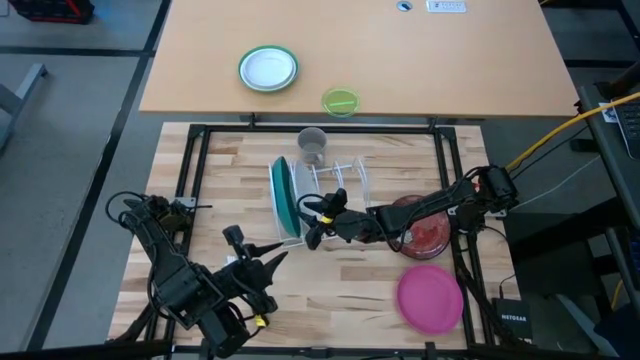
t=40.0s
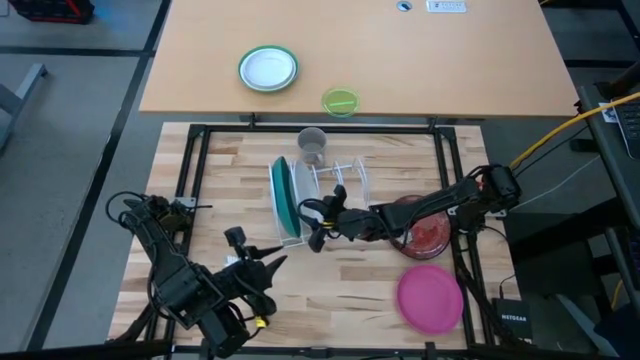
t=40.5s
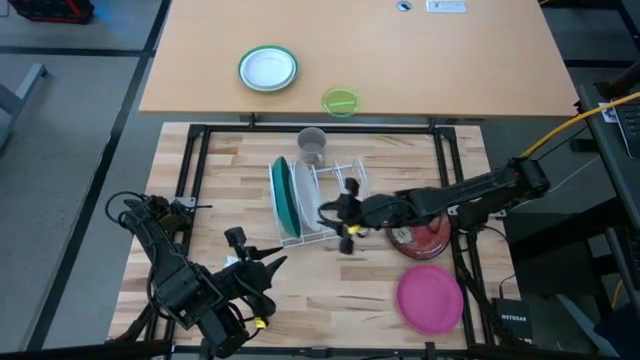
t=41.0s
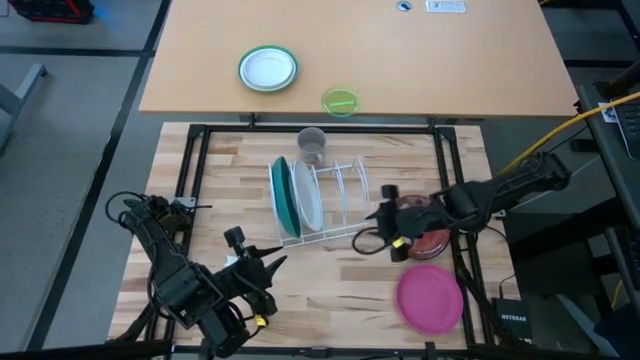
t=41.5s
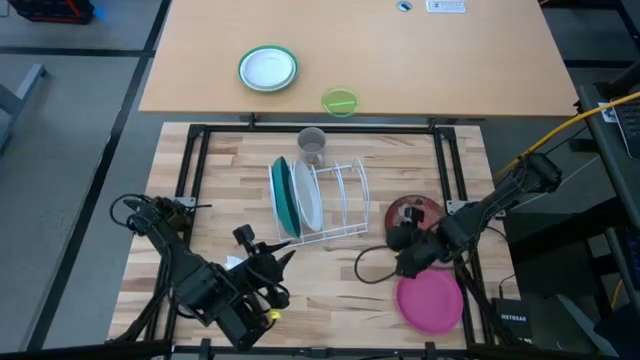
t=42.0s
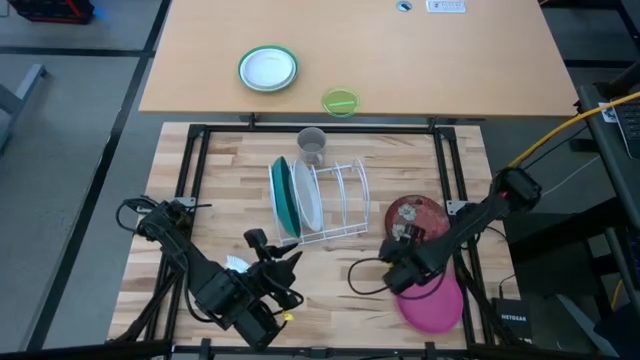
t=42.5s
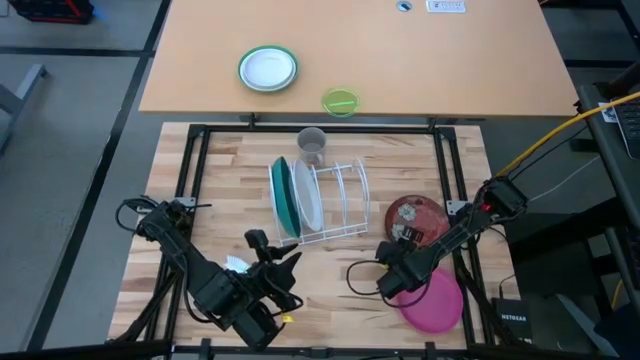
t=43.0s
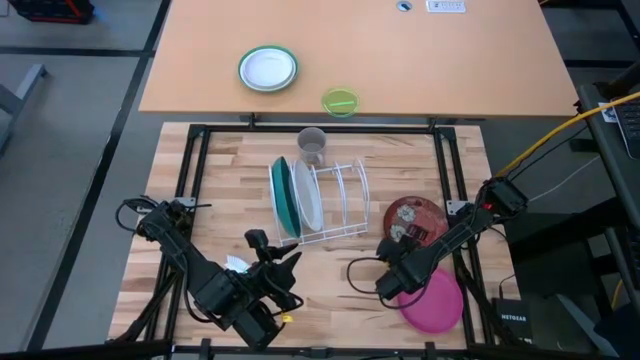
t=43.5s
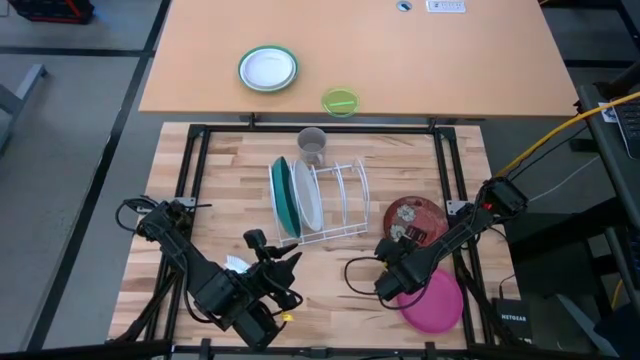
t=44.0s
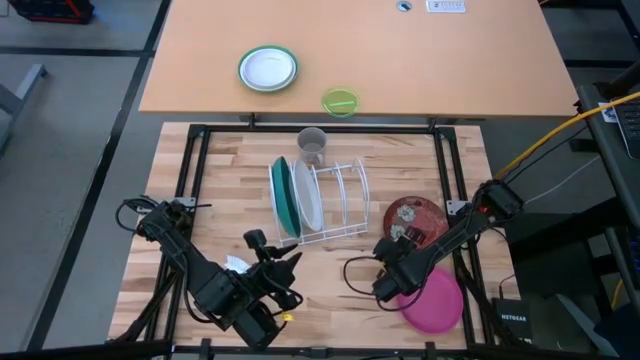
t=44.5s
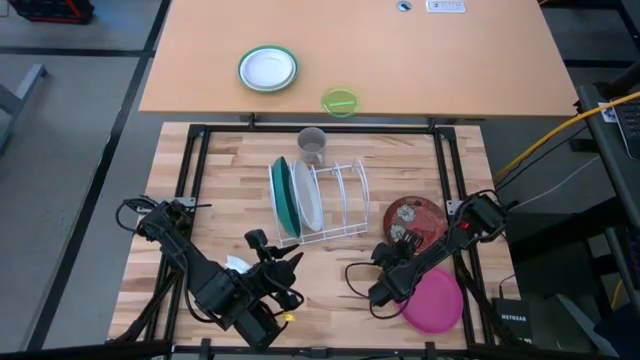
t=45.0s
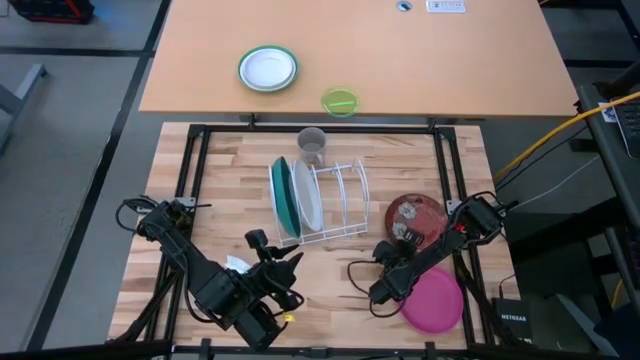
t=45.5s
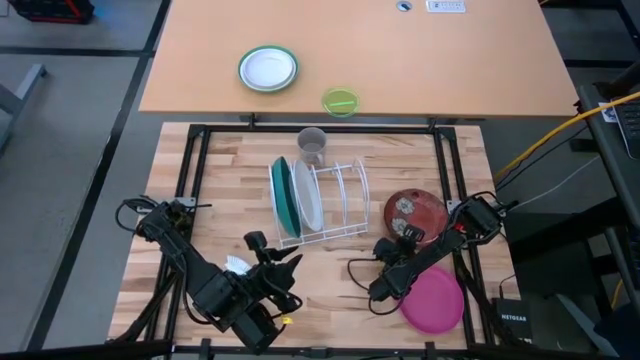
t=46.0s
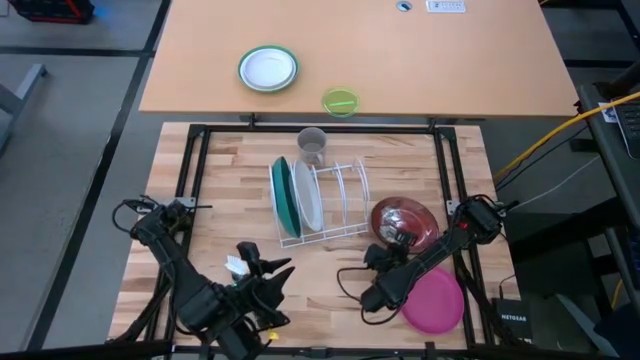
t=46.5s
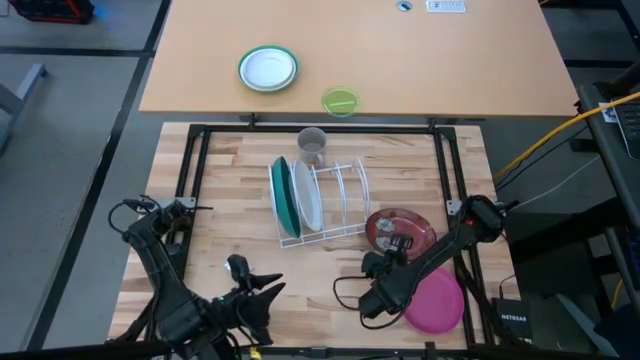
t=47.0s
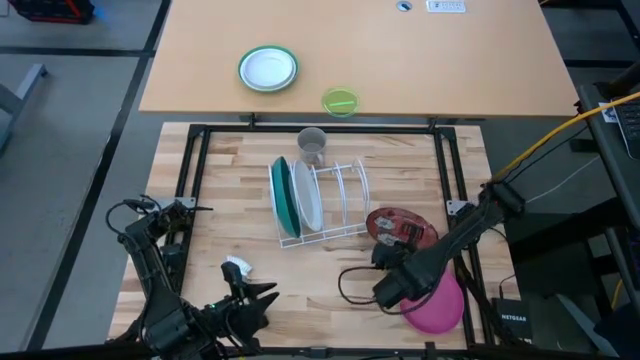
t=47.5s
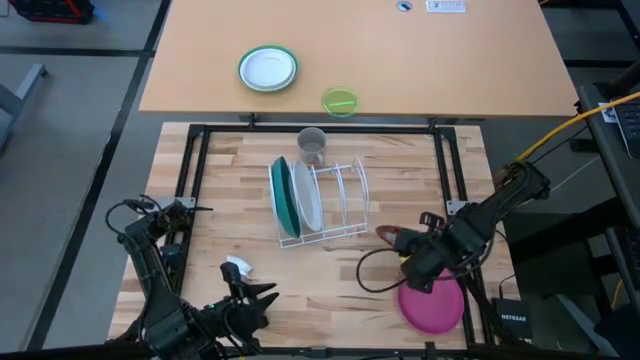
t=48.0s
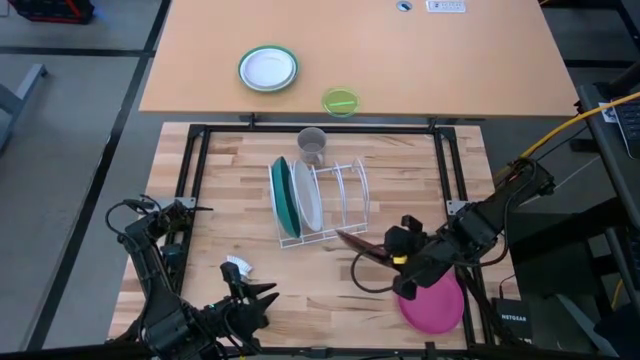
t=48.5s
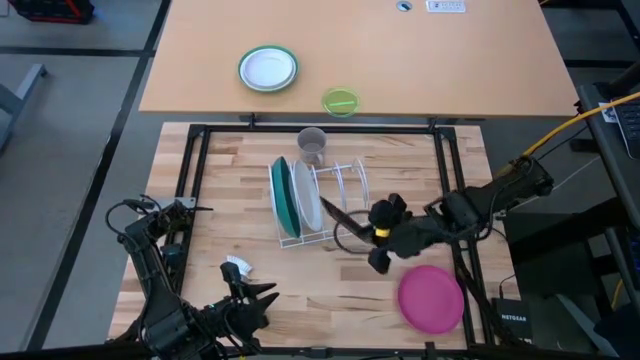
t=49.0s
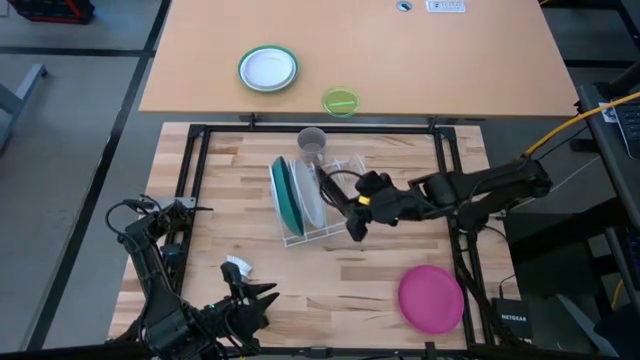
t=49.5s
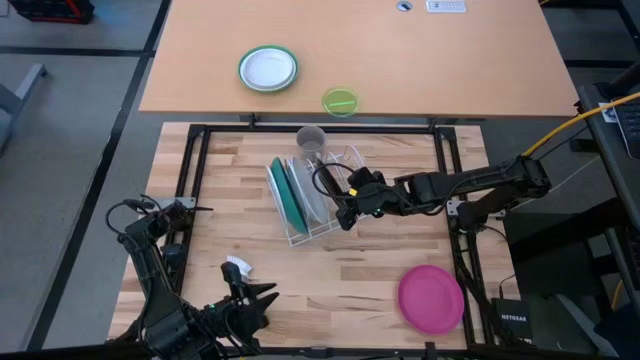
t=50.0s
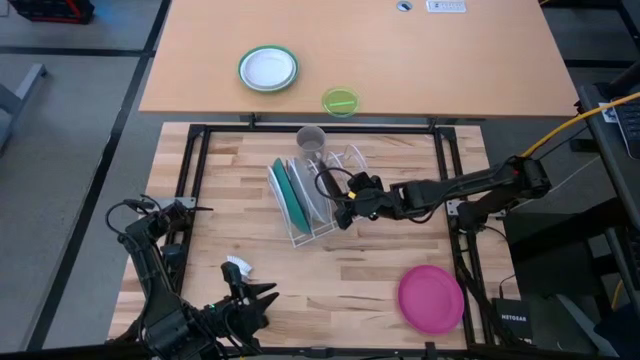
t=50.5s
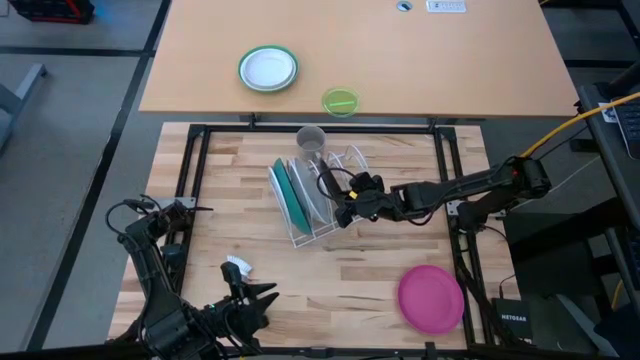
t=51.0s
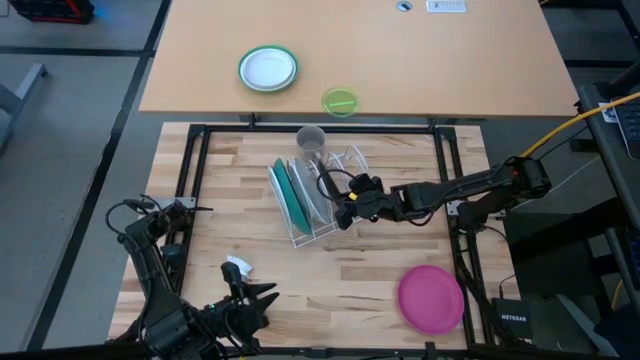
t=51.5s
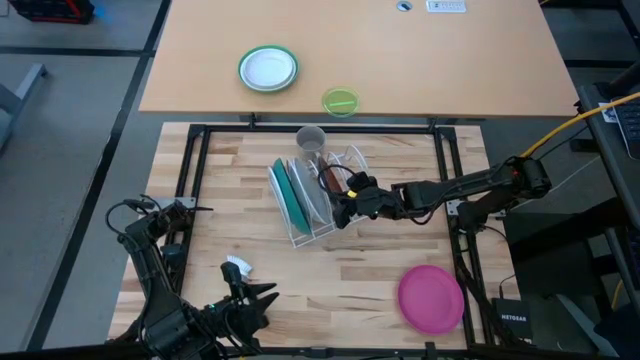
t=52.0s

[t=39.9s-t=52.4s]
Task: Sort dishes
Put the red plate into the dish rack

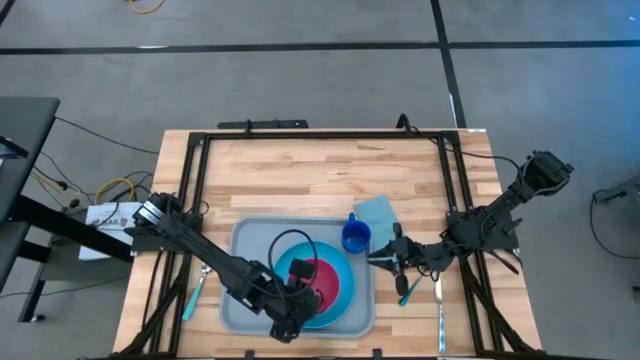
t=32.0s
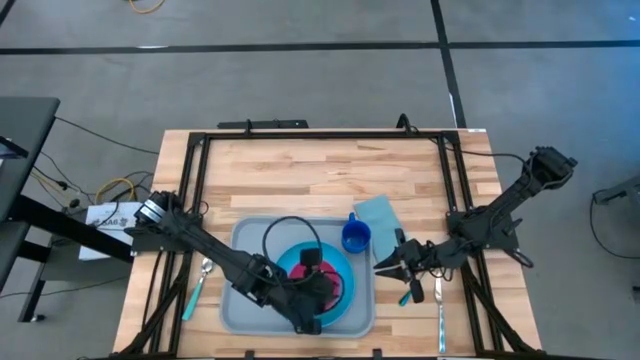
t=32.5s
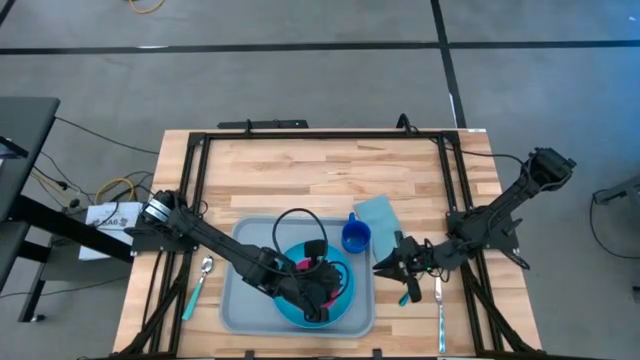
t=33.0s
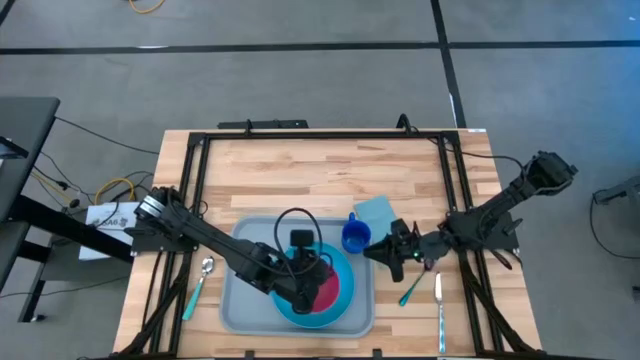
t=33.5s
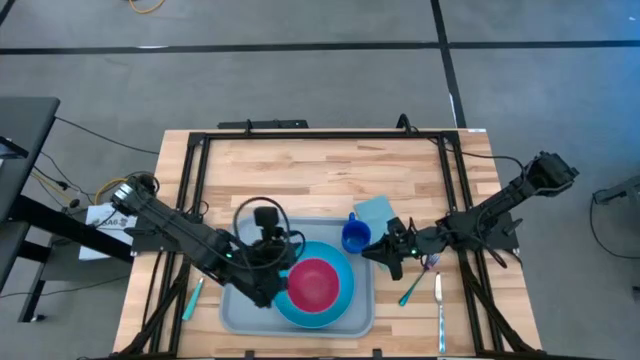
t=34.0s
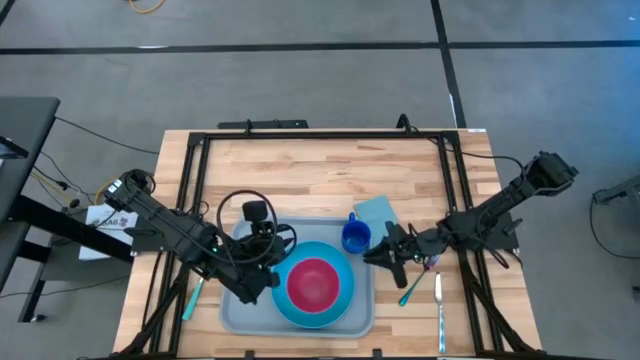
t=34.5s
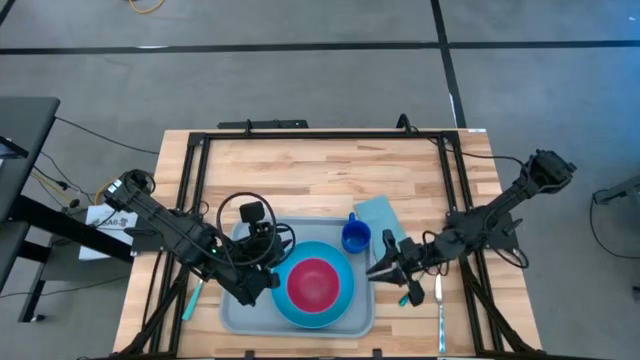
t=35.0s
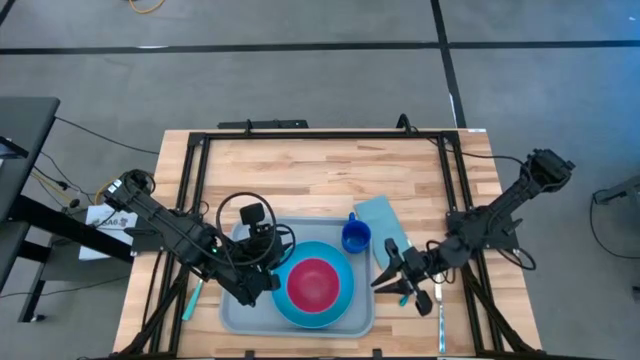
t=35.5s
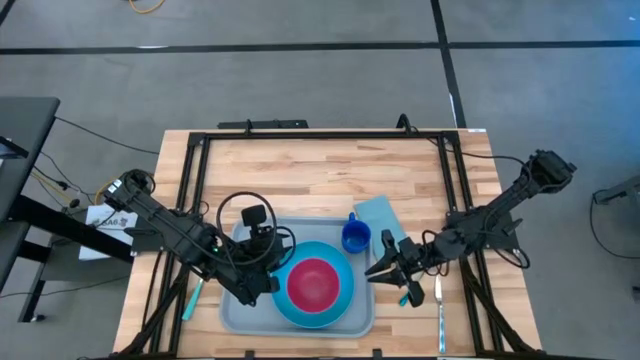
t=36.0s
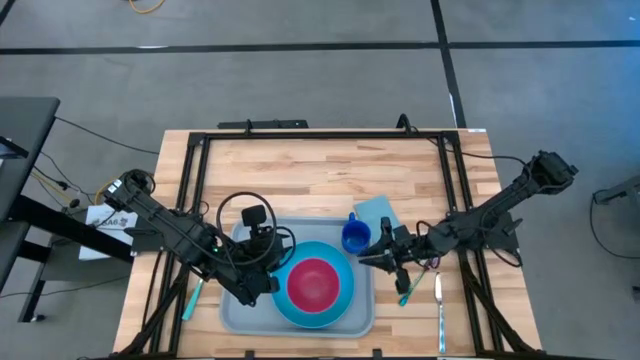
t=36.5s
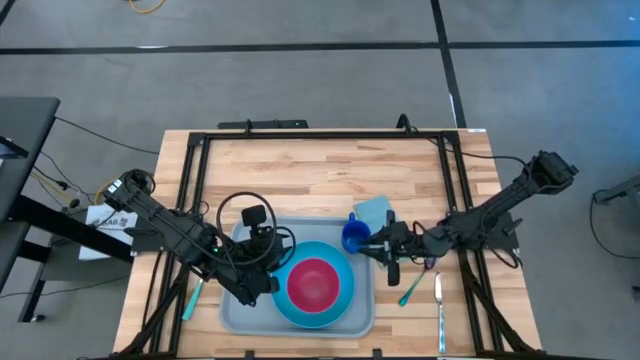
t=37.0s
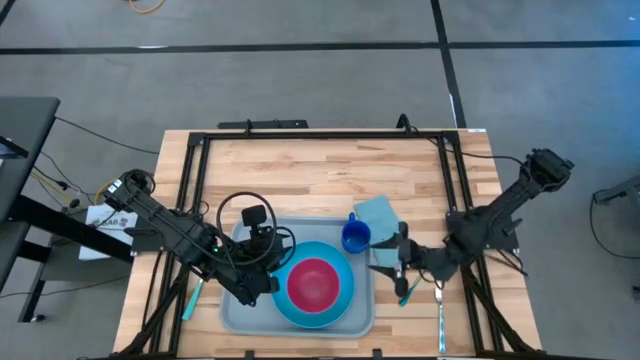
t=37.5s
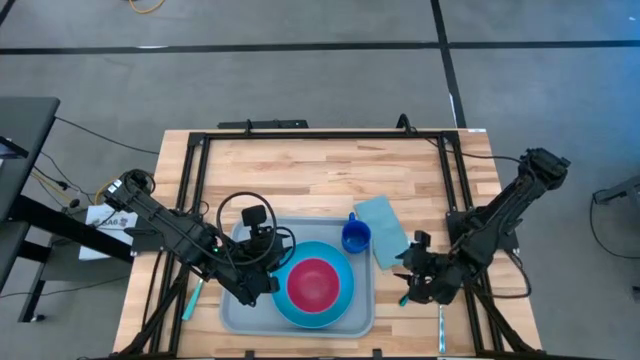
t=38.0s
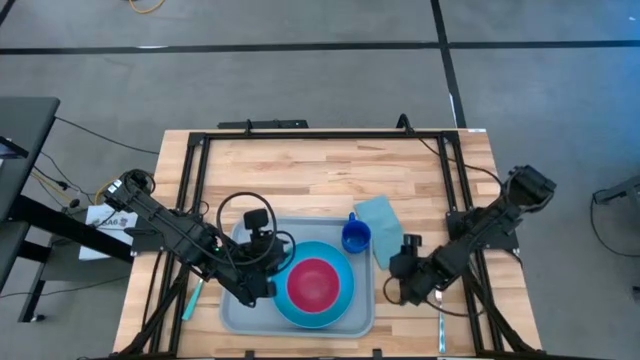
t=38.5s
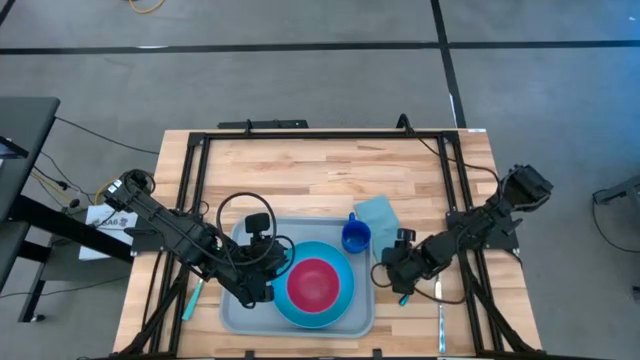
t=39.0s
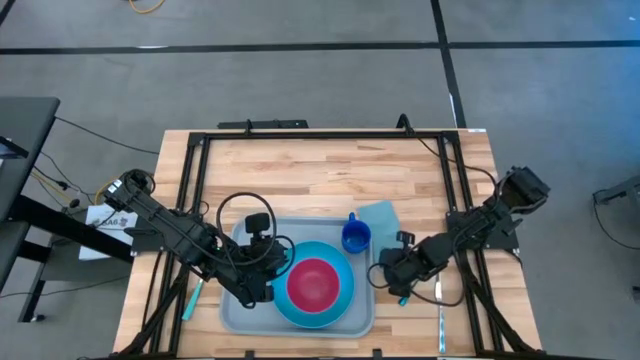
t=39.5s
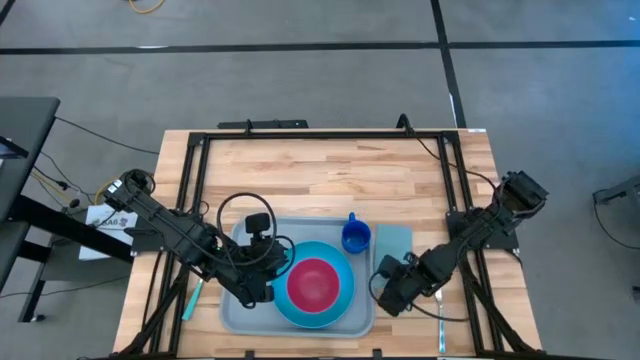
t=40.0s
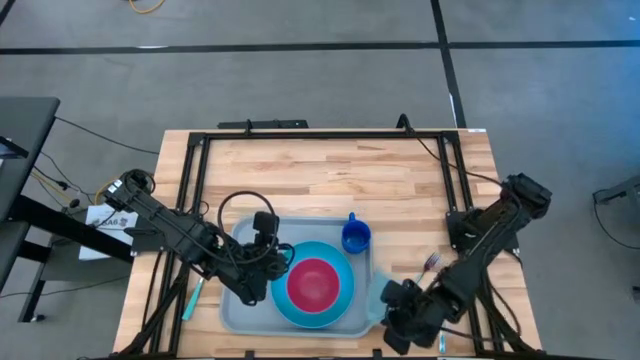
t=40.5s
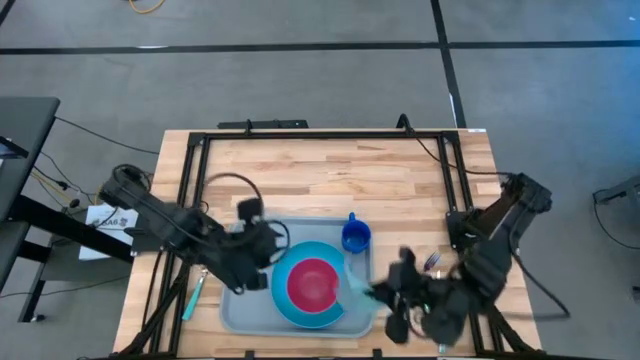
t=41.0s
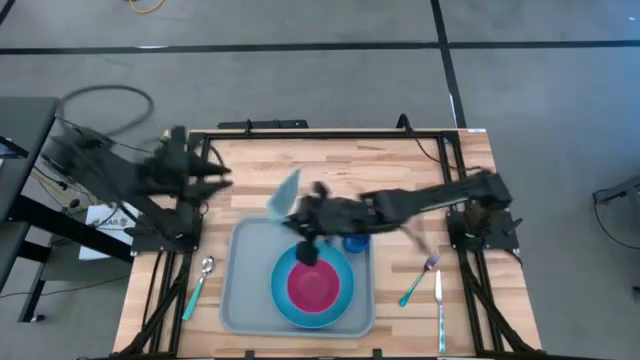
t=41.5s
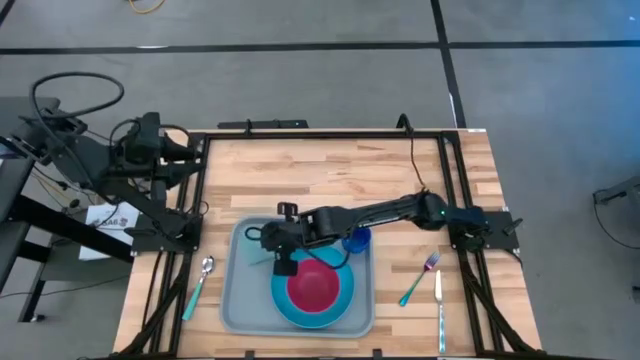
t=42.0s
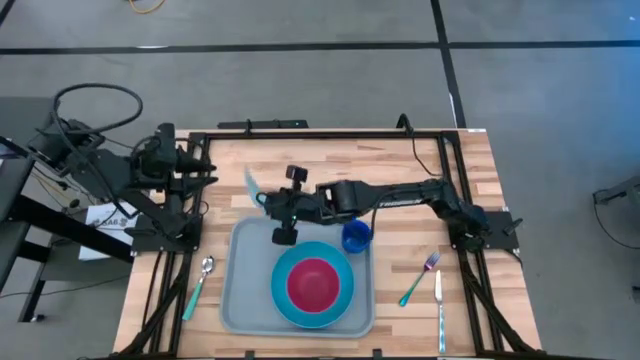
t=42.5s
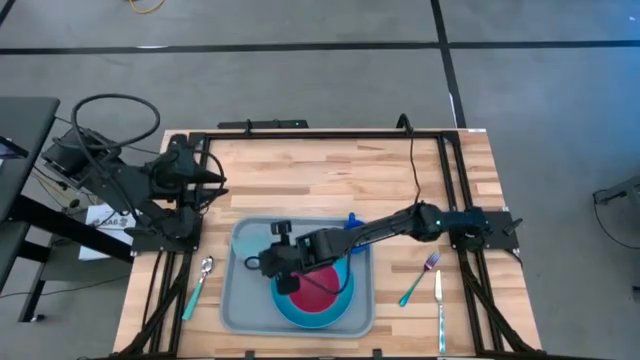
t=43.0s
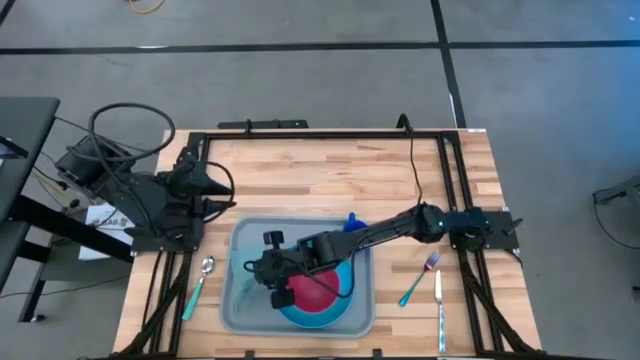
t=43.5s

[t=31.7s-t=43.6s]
Task: Set up tray
Put the green napkin on the left side of the blue plate on the gray tray
